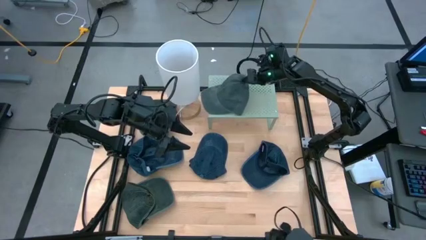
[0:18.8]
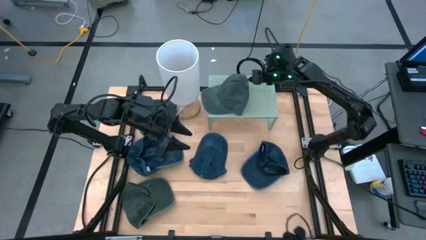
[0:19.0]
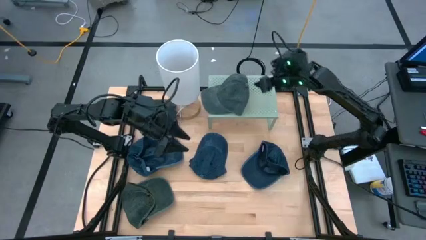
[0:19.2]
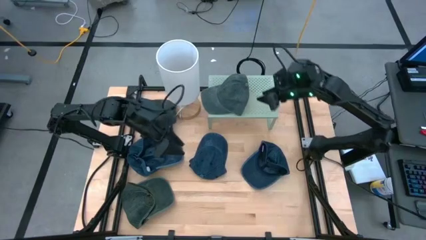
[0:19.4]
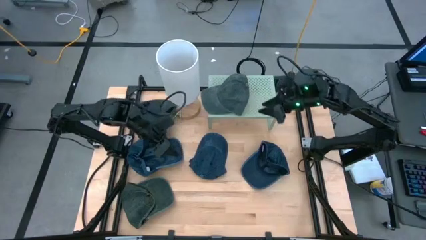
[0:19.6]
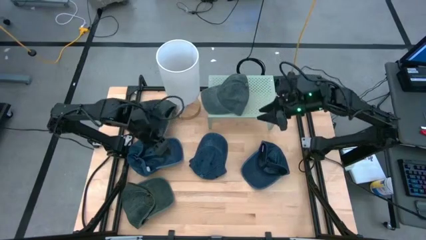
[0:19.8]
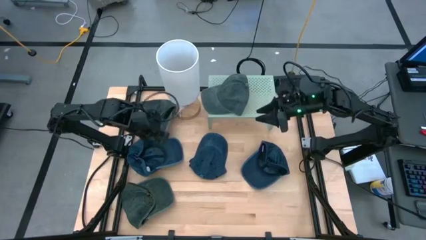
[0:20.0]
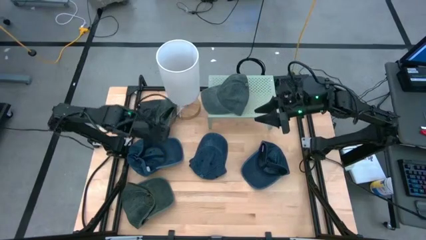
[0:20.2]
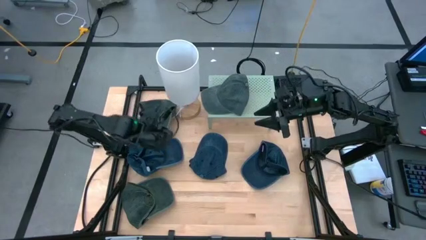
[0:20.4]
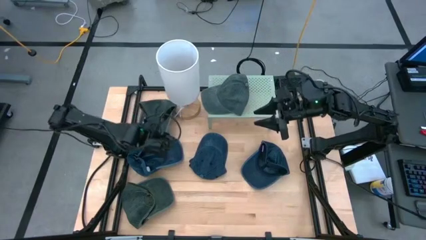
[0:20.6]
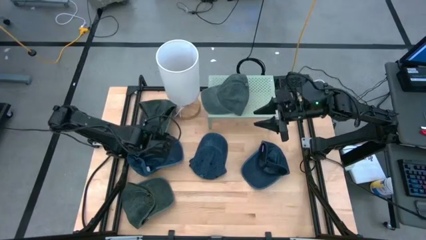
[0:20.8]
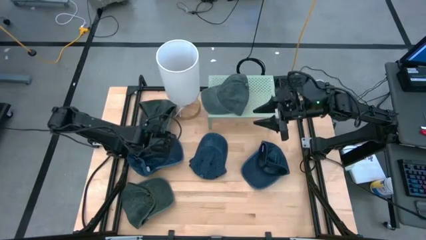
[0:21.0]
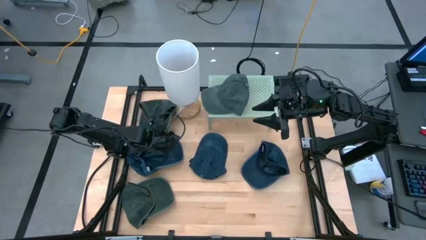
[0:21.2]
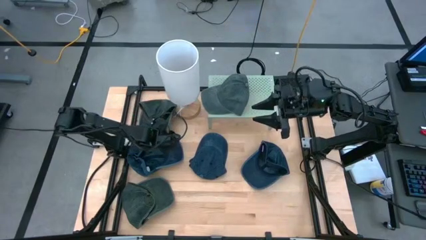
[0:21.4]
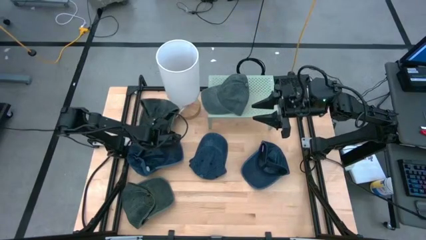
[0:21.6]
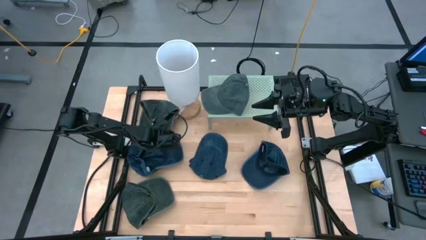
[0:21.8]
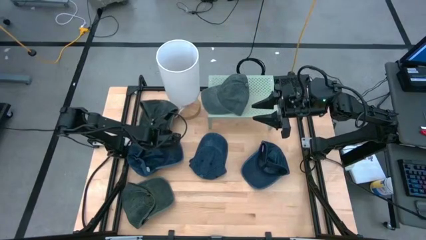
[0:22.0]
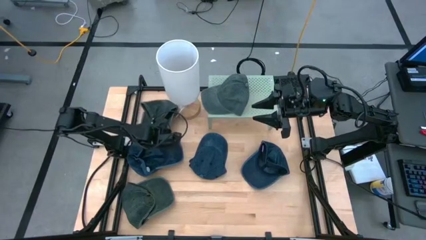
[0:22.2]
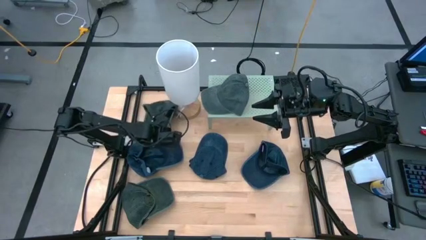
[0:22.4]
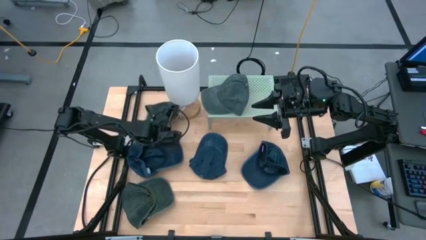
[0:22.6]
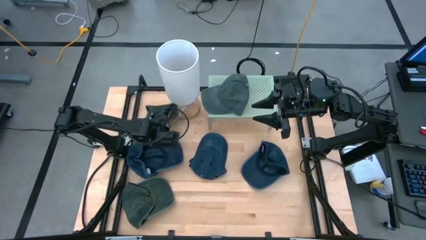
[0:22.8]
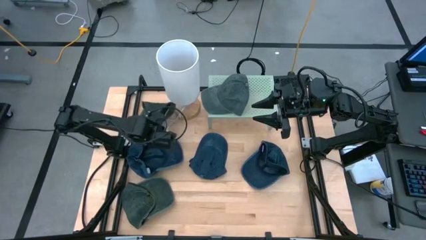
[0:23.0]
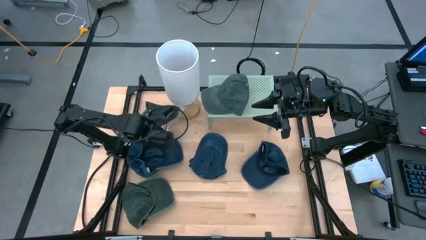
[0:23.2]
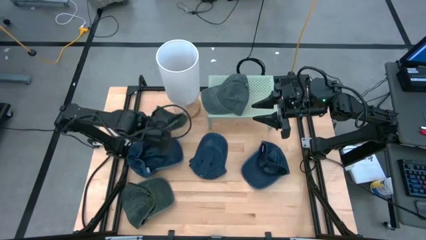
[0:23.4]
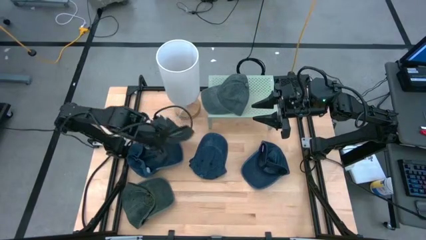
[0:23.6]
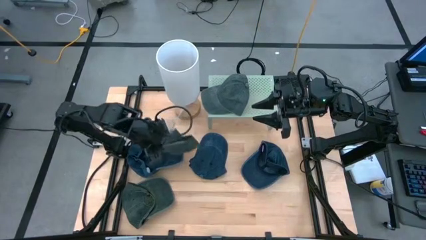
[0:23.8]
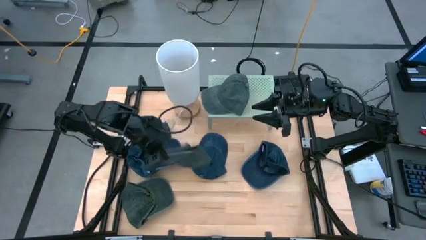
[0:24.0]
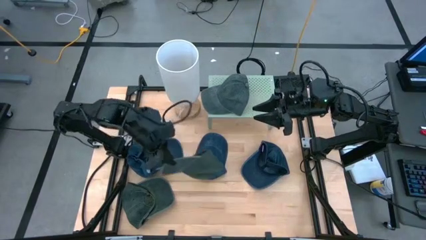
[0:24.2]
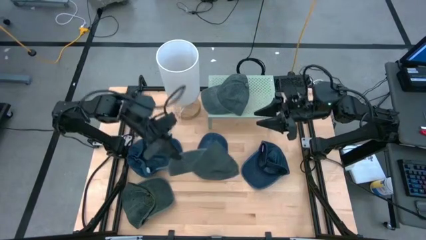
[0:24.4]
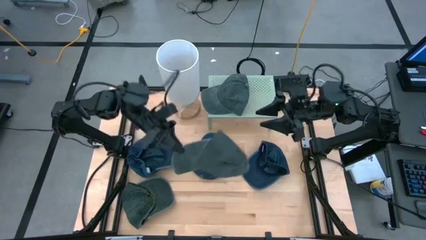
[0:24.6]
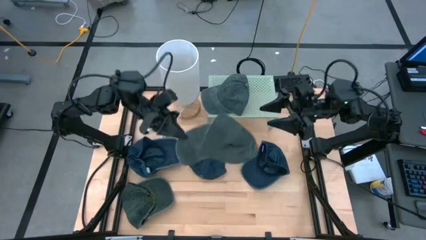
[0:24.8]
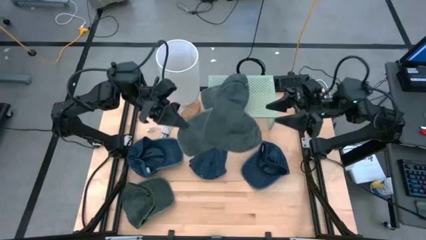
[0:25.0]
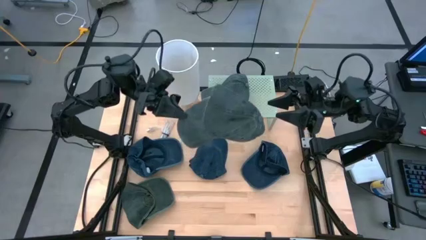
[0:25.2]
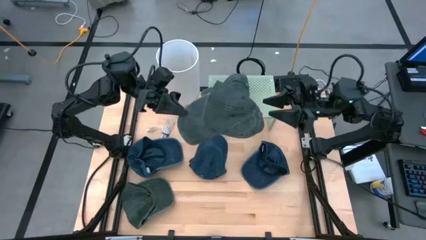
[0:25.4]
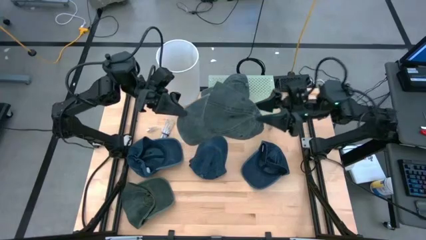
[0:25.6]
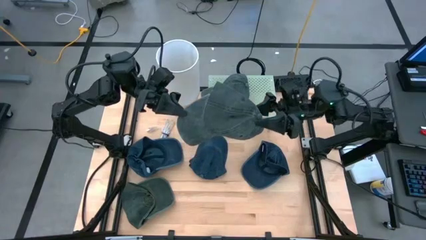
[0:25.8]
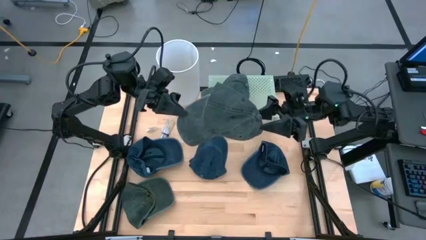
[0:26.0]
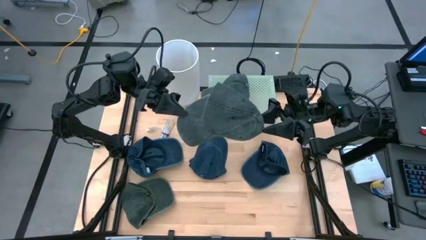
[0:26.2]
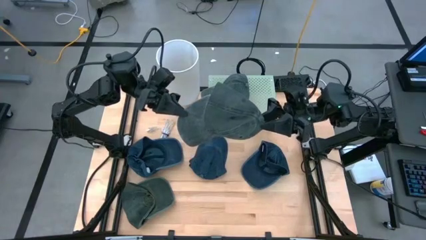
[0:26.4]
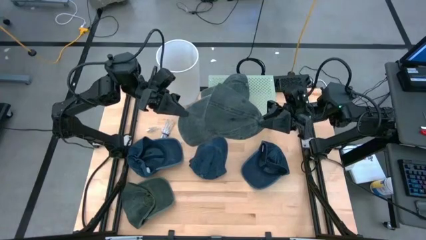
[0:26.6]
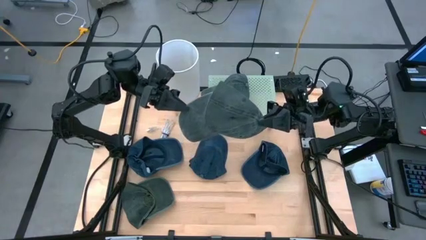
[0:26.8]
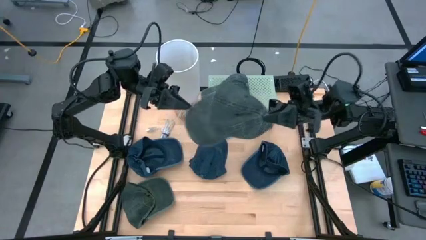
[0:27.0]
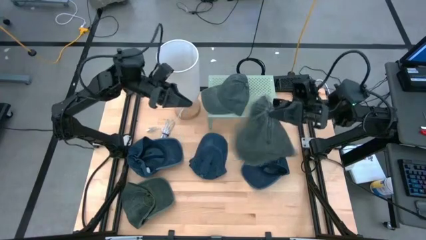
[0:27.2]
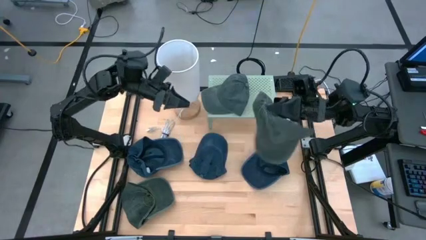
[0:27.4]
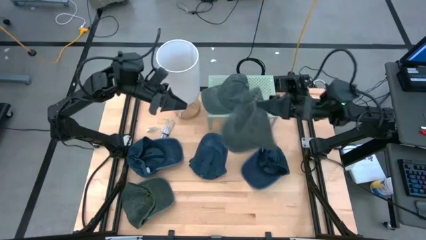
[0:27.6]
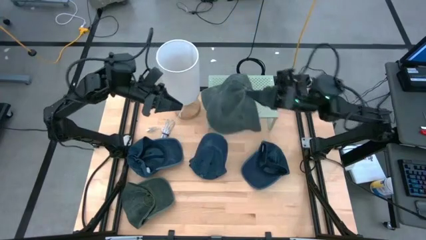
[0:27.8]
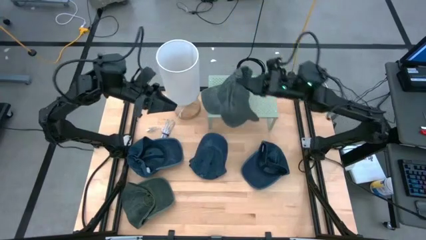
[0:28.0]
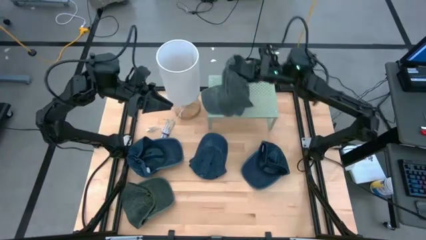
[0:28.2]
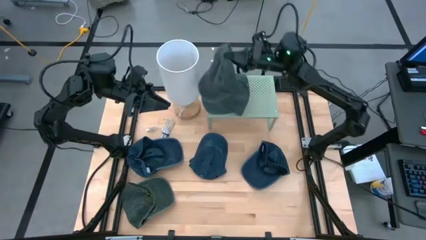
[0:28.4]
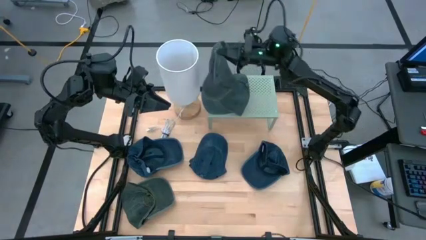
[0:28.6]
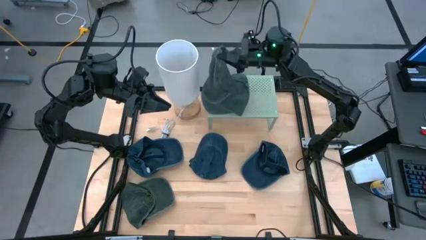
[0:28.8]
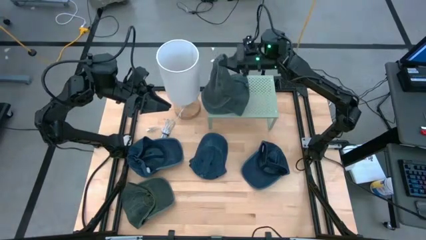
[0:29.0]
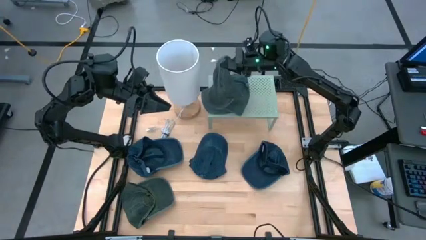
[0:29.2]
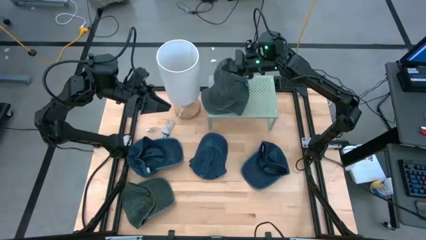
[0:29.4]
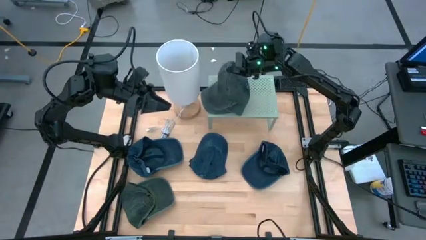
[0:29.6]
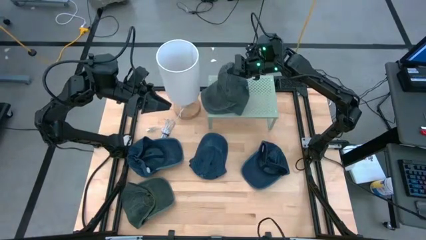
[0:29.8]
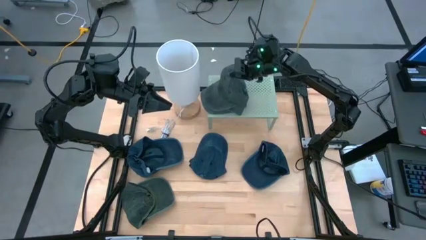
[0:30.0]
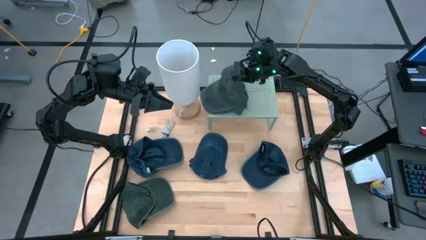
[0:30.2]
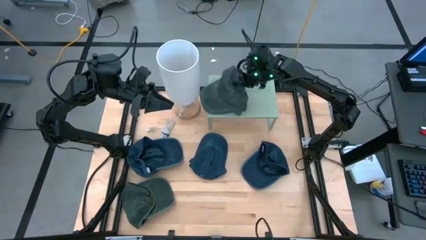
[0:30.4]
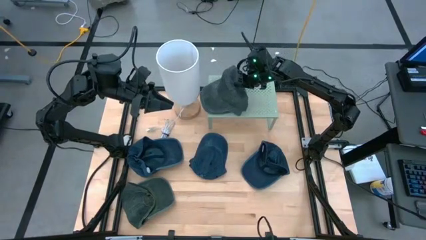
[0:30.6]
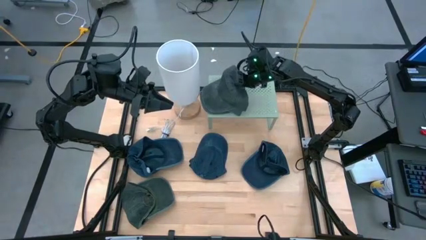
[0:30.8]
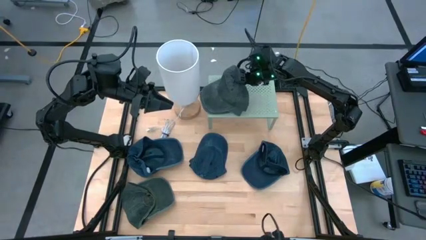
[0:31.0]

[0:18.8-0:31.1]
Task: Pick & Place hat
Stack the top green cap on the green cap on the shelf
